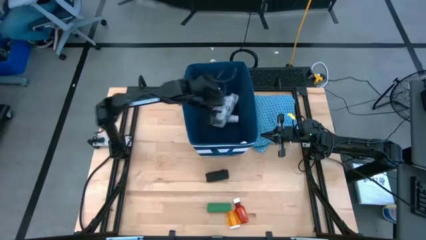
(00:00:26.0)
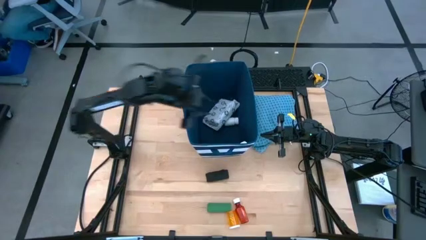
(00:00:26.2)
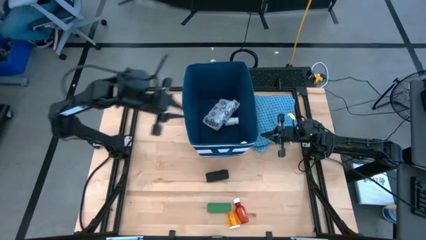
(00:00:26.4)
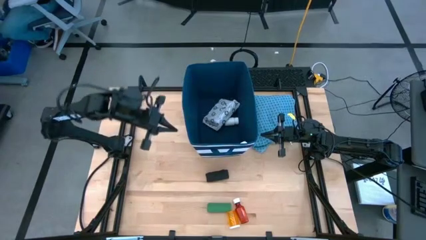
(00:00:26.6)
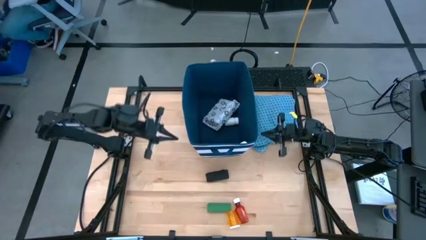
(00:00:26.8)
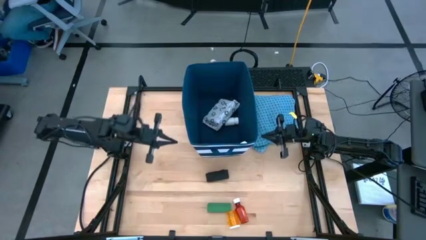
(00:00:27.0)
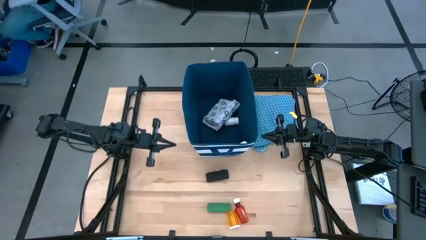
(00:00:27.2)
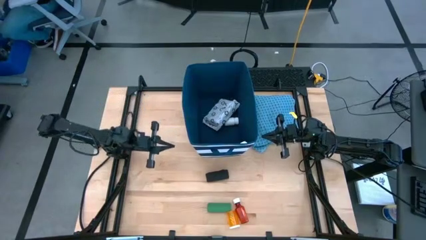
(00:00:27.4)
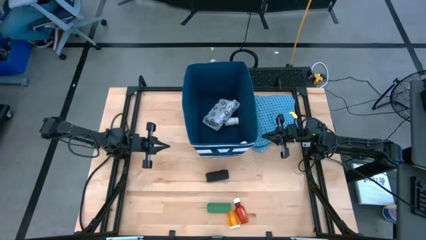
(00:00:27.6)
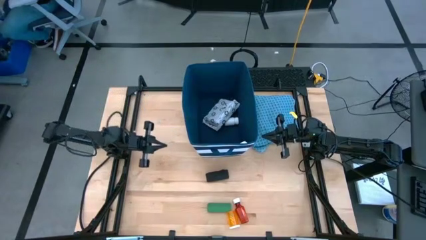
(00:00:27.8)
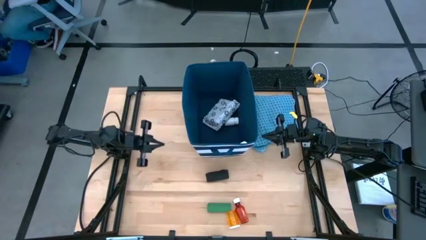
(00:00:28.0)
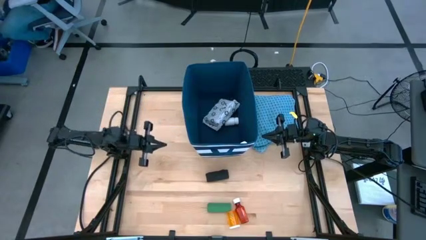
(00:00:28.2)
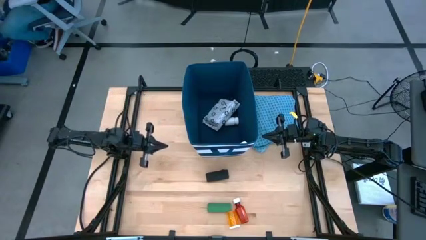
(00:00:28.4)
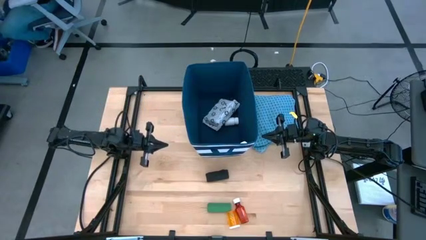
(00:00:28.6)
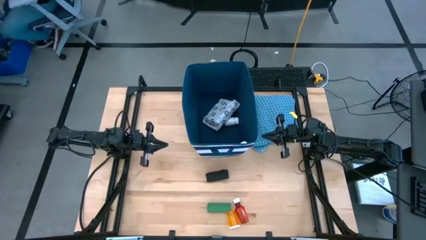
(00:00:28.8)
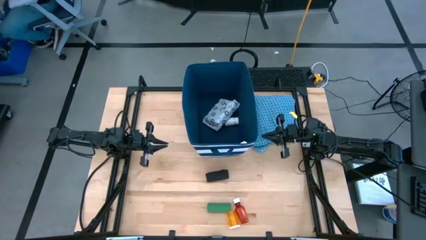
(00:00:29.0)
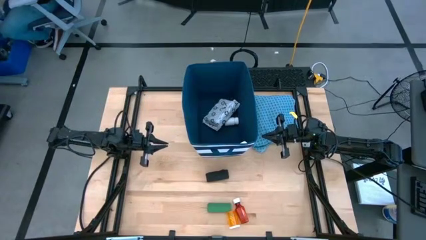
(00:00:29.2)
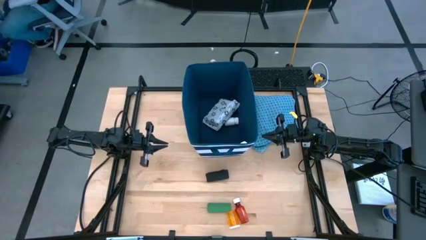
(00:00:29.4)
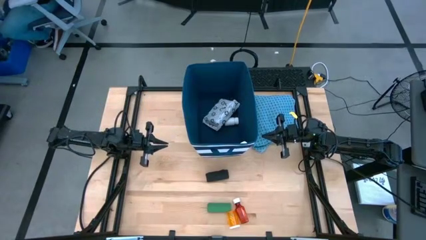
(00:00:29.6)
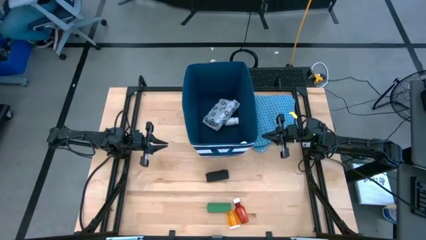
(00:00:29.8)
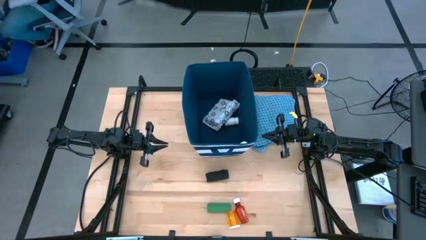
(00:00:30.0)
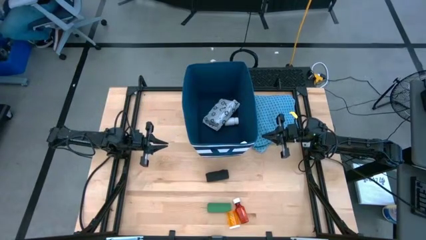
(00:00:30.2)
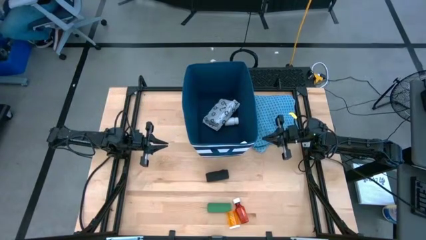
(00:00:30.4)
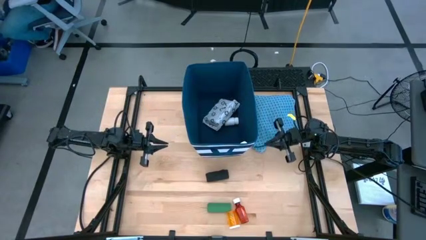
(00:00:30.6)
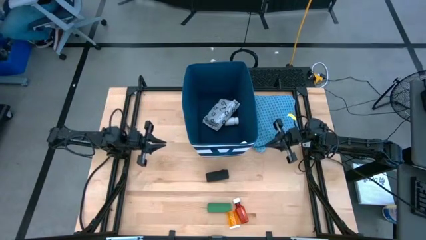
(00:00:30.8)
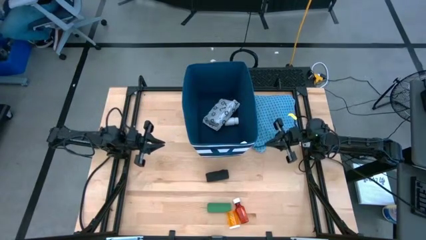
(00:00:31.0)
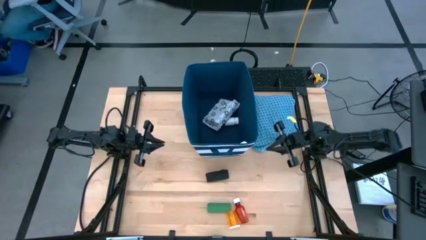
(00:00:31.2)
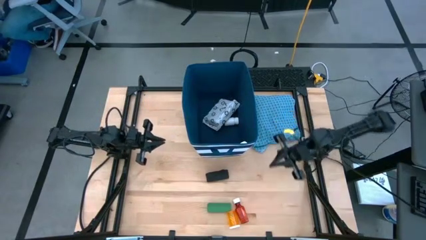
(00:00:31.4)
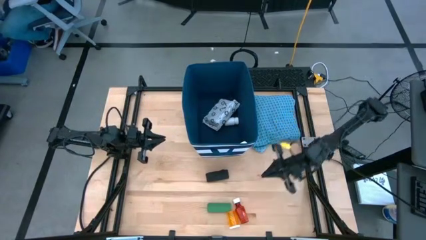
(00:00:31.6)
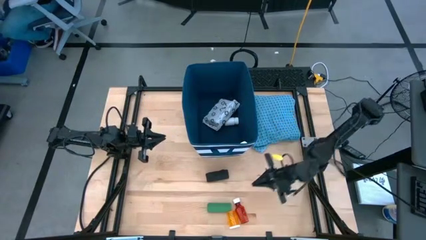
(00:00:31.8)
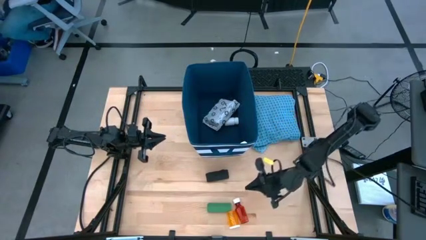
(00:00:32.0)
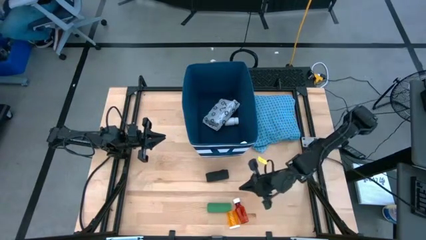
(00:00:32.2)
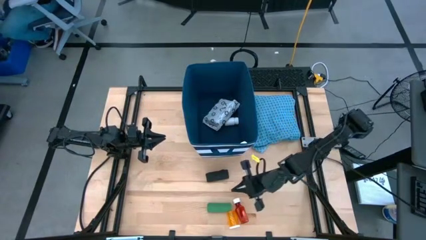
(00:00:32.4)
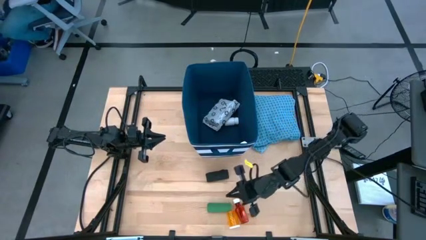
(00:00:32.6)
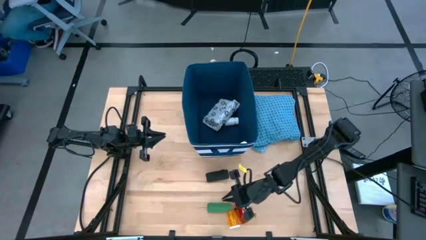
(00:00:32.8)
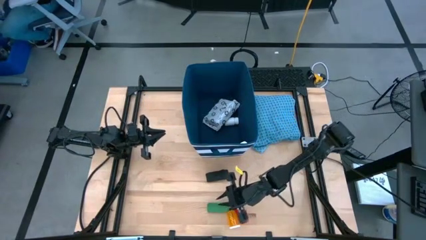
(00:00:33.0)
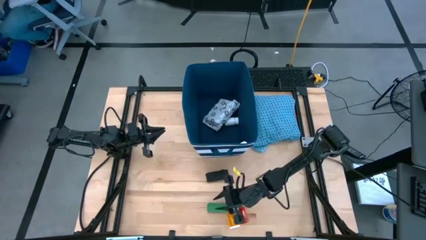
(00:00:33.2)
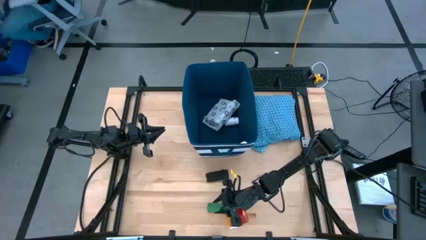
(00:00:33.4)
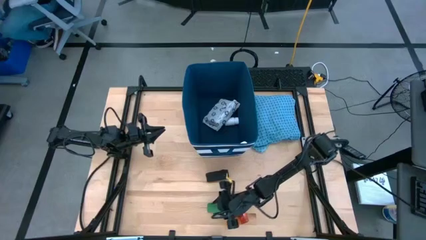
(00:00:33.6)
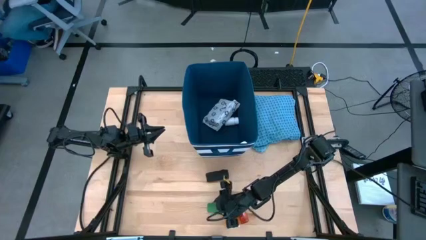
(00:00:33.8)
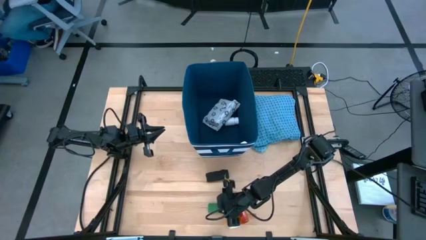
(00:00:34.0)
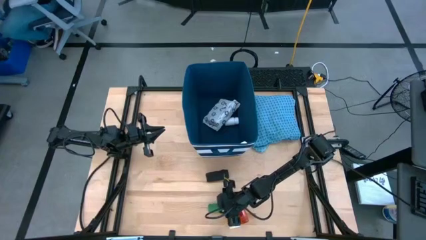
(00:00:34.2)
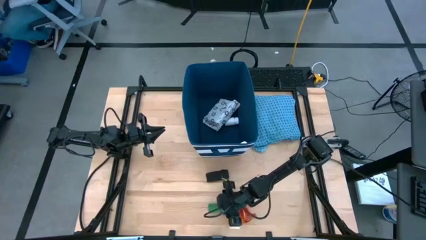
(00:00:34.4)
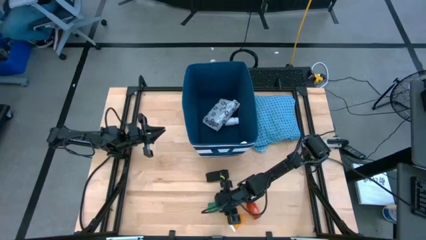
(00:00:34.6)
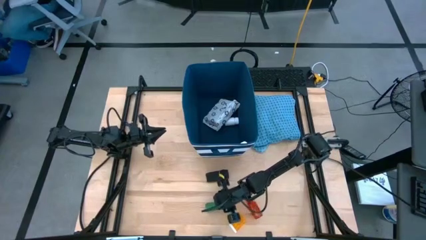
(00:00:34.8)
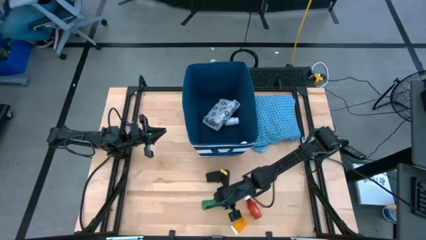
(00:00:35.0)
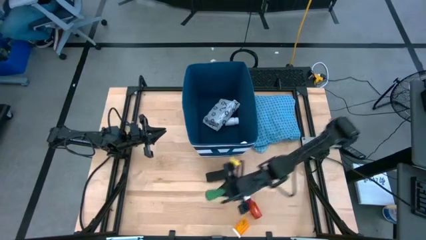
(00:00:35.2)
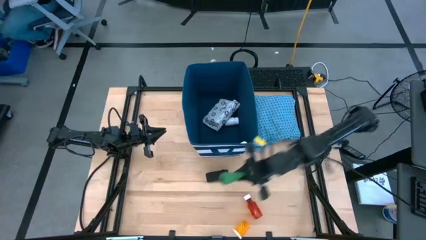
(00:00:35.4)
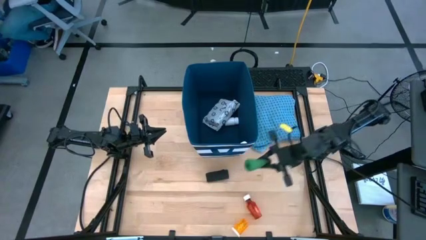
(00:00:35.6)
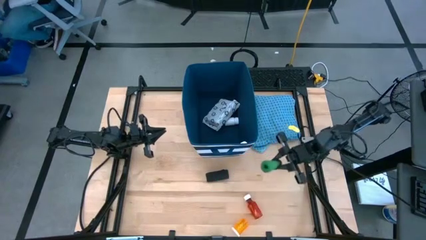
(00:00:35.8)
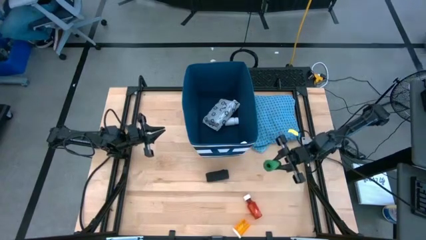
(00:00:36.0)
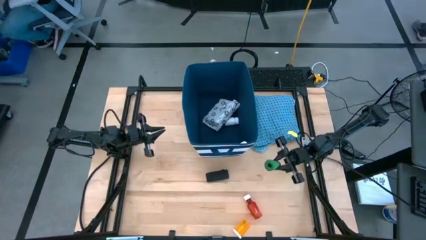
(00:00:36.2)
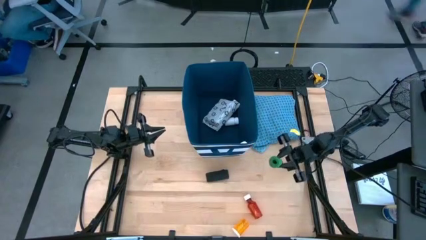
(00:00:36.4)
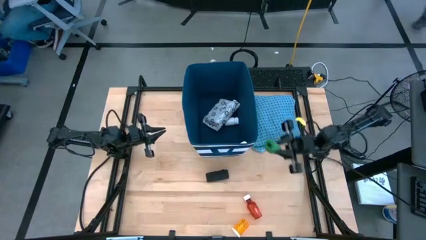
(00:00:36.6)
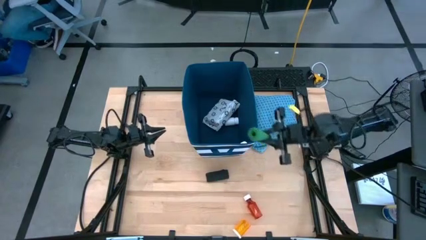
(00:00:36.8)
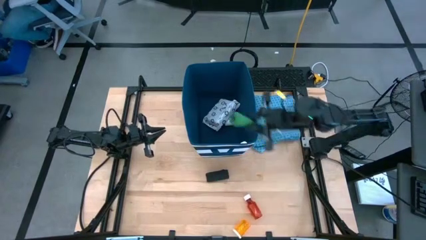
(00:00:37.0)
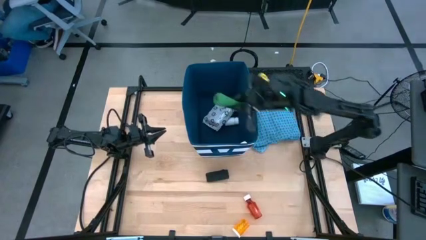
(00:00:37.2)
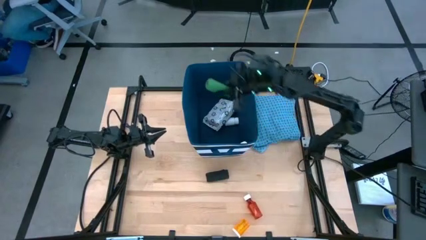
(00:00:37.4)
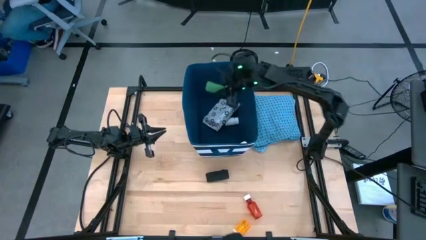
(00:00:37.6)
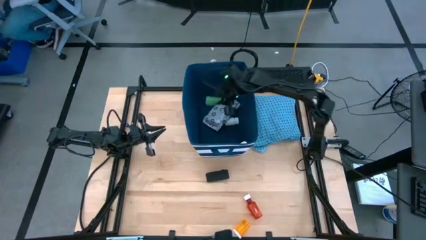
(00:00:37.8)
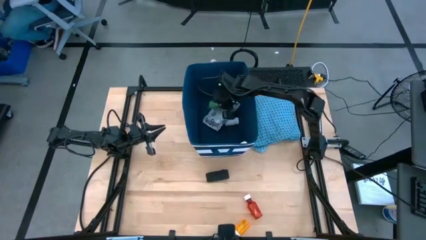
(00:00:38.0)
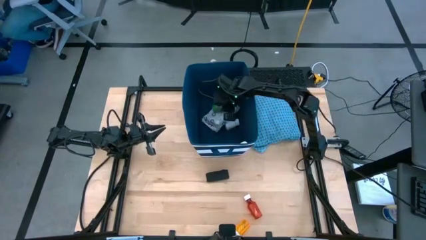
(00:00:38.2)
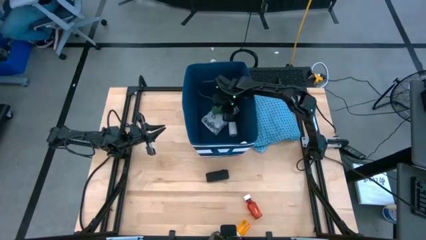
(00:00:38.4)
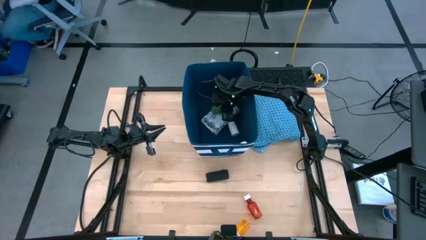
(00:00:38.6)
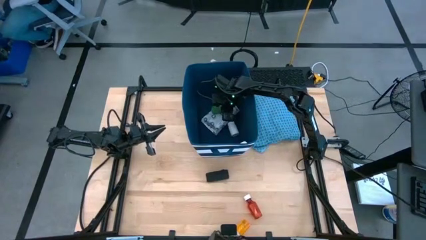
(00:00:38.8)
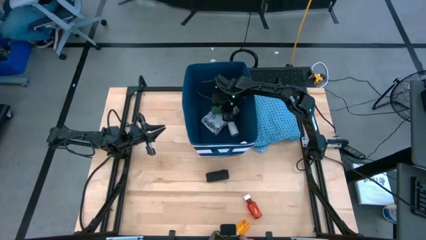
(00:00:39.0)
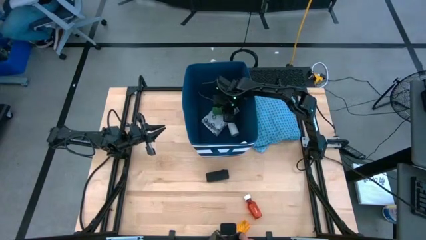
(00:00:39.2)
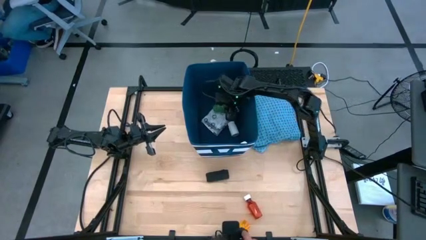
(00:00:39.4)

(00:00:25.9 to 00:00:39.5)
Task: Pick & place medical supplies in basket/bin
Put the green bandage into the blue bin
